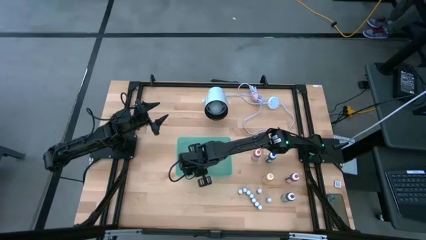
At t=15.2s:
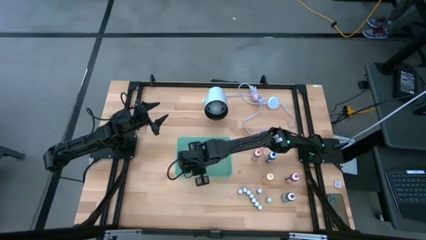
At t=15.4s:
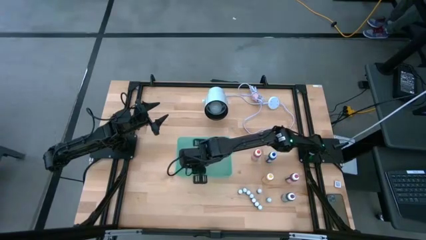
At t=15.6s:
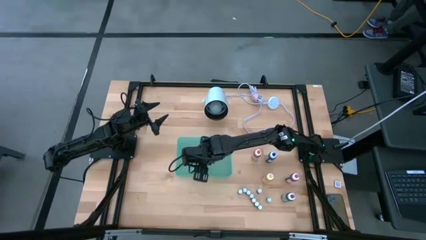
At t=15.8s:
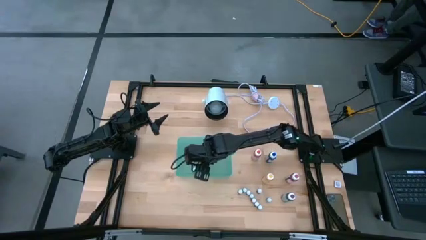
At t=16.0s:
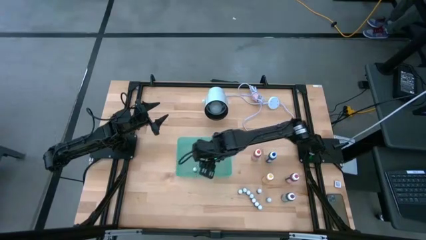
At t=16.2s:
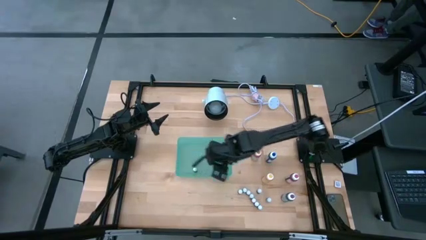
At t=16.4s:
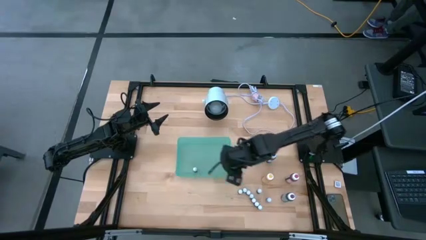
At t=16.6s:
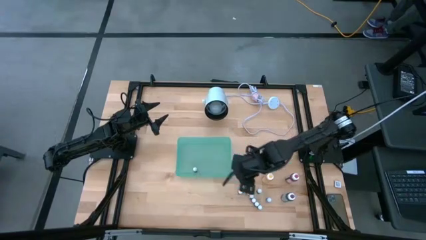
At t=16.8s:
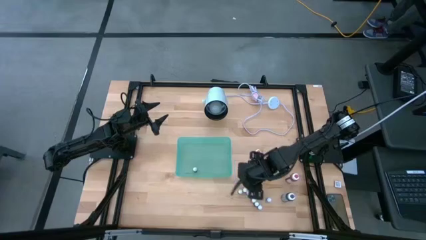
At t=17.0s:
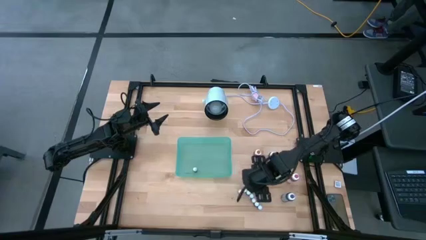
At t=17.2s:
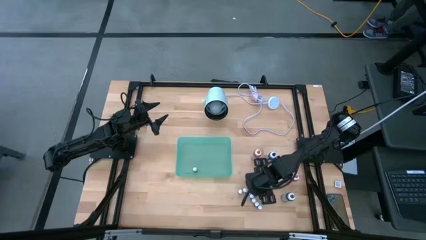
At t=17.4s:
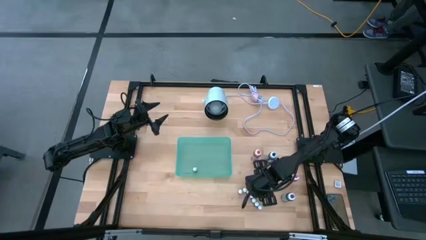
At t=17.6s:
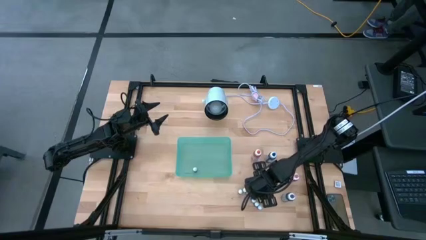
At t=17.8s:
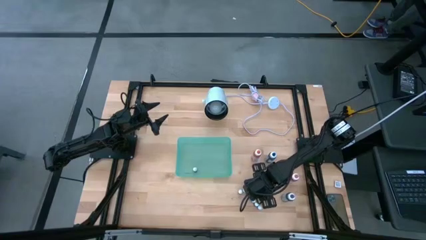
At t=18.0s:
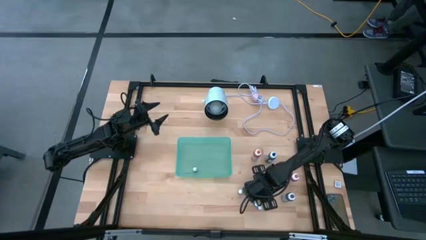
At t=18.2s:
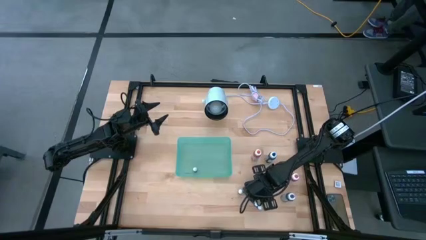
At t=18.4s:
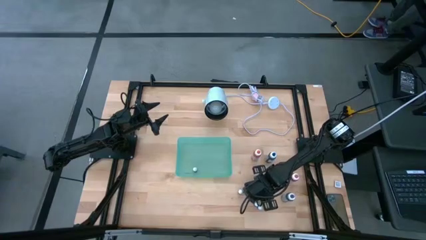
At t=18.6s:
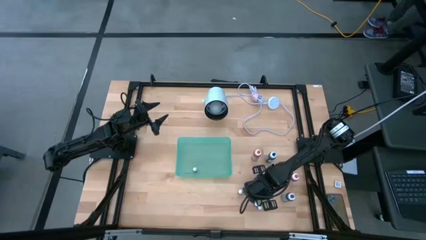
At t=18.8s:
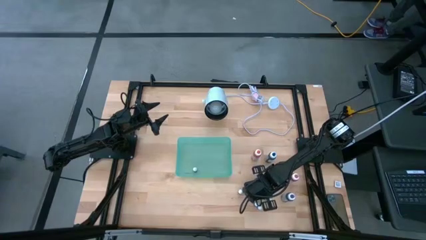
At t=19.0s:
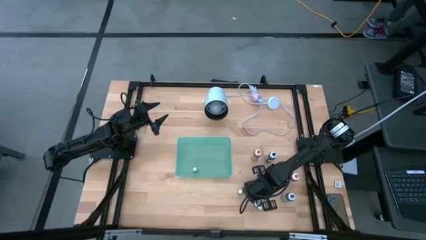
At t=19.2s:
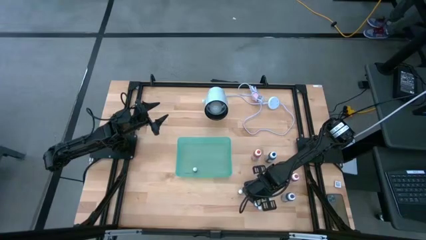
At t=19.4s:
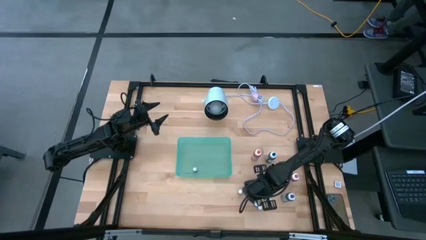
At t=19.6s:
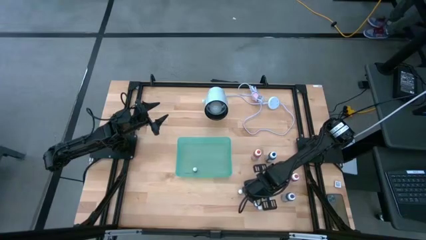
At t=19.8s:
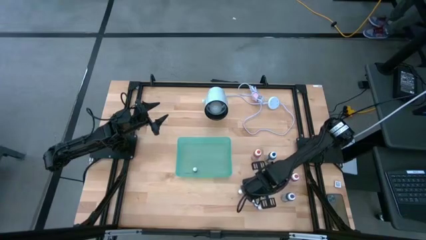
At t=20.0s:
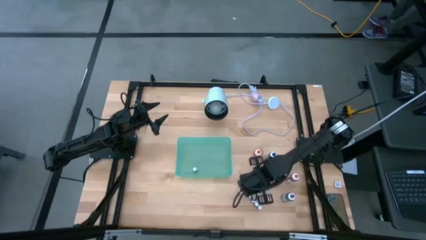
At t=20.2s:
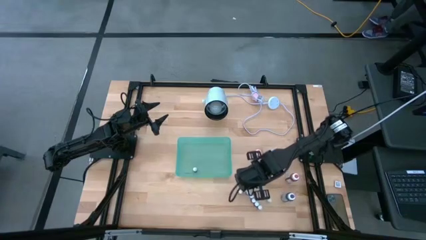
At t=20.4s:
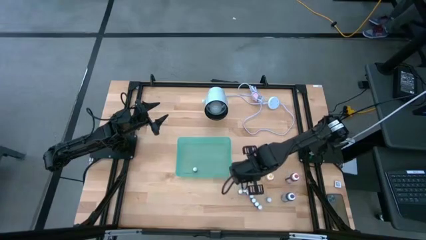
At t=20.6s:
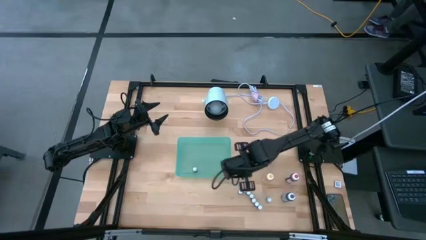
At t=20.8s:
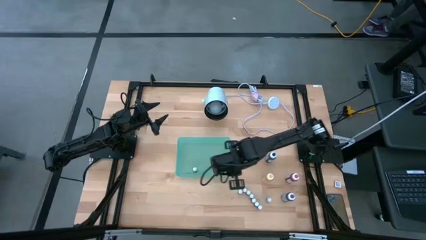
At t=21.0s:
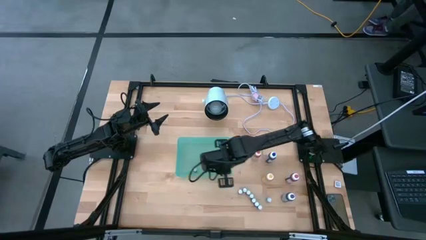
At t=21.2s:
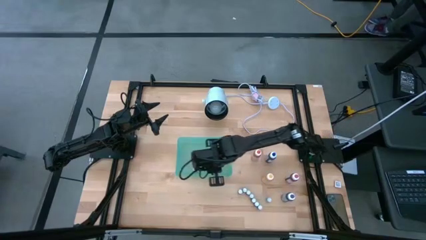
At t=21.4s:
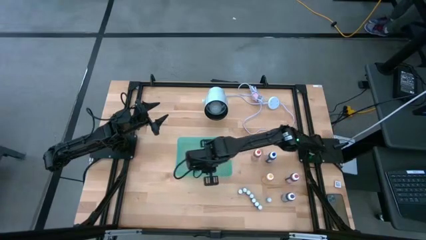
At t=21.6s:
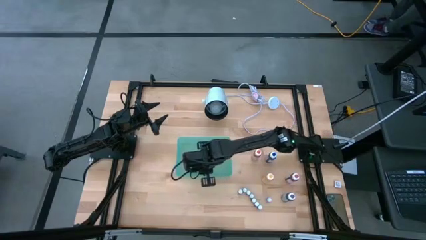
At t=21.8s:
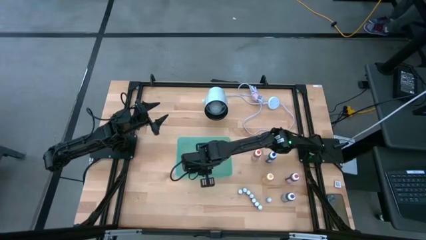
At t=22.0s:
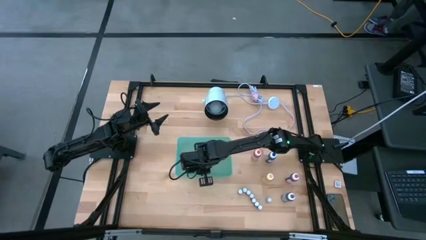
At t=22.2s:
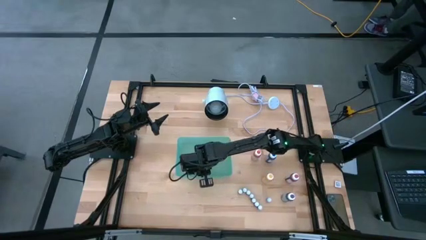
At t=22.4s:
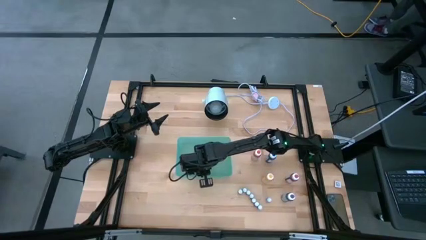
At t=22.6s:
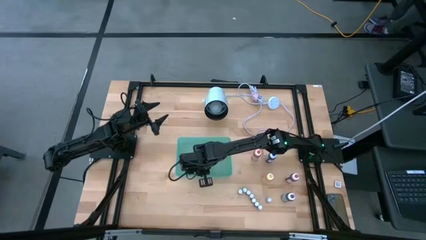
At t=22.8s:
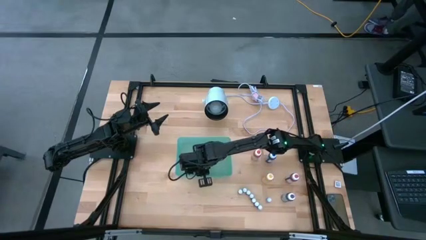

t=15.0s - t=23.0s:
Task: Pick & Place food coloring
Put the small dark blue food coloring bottle into the bin

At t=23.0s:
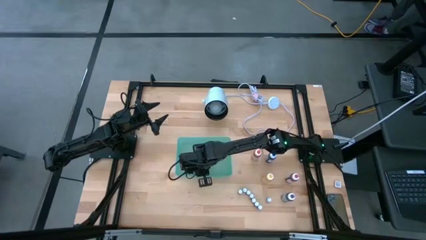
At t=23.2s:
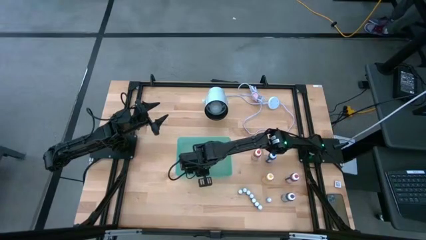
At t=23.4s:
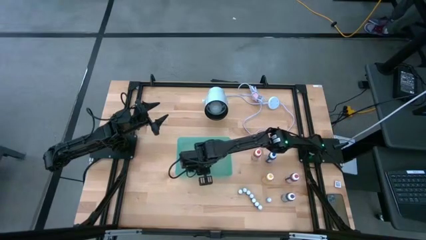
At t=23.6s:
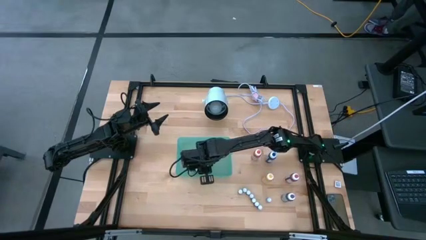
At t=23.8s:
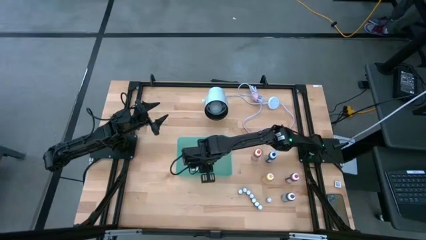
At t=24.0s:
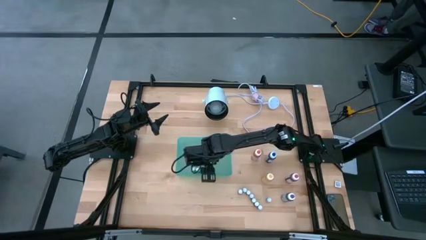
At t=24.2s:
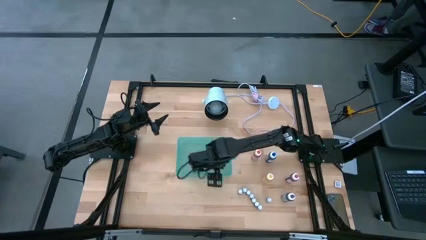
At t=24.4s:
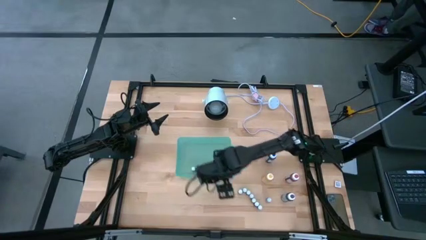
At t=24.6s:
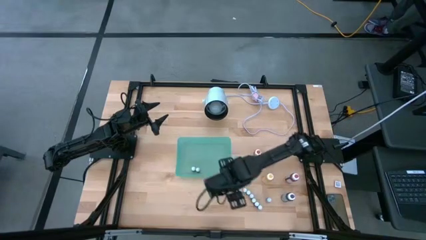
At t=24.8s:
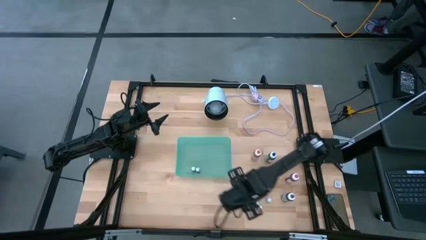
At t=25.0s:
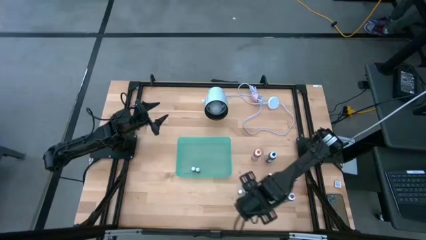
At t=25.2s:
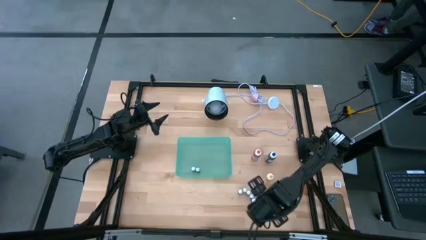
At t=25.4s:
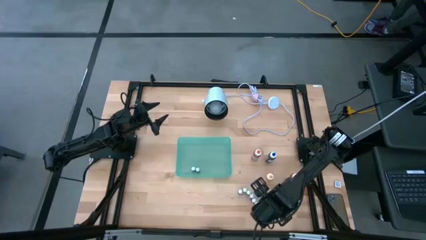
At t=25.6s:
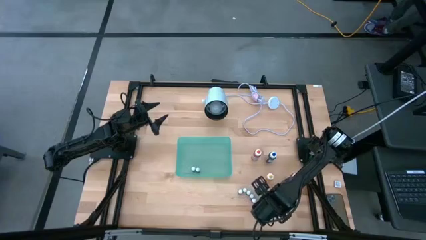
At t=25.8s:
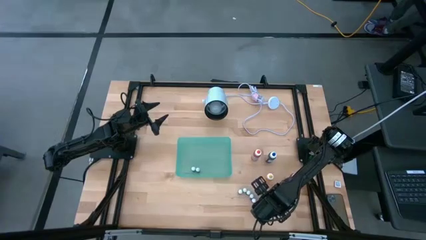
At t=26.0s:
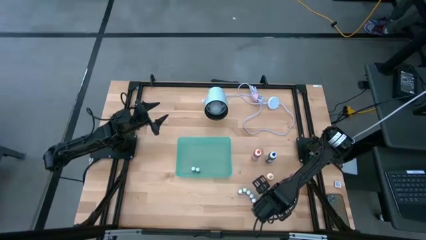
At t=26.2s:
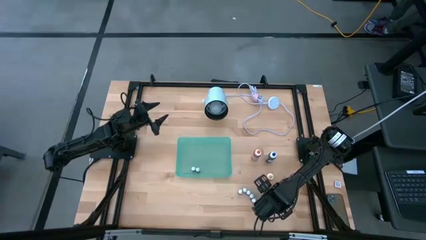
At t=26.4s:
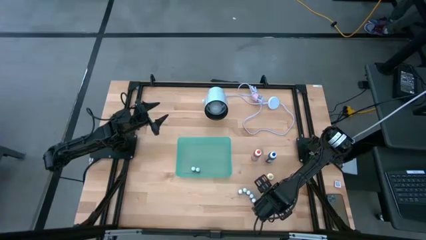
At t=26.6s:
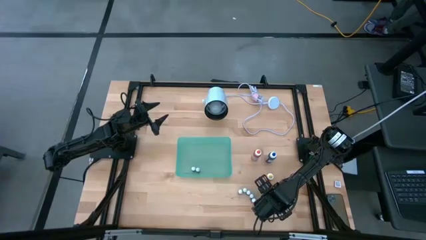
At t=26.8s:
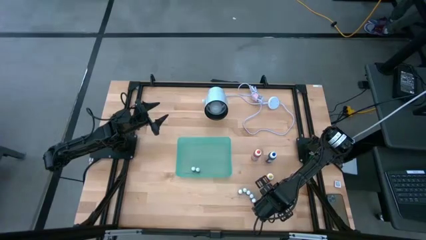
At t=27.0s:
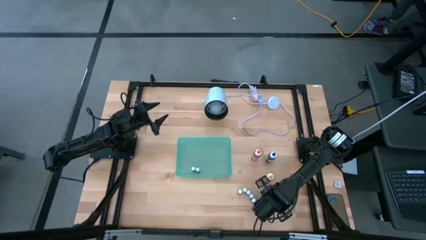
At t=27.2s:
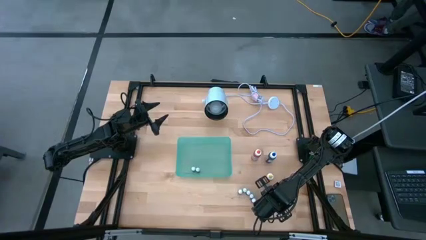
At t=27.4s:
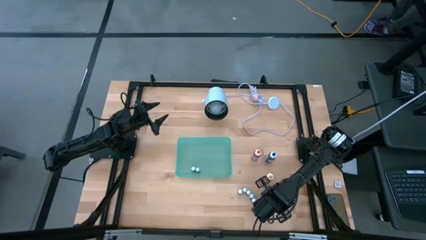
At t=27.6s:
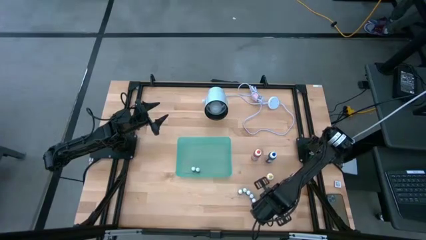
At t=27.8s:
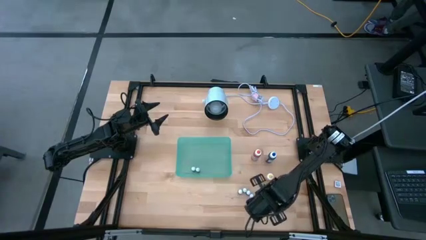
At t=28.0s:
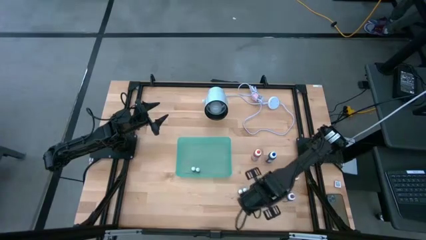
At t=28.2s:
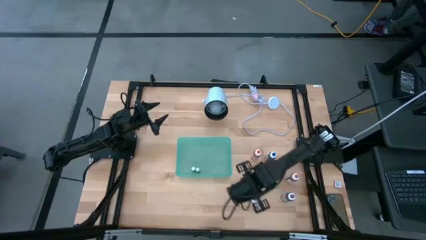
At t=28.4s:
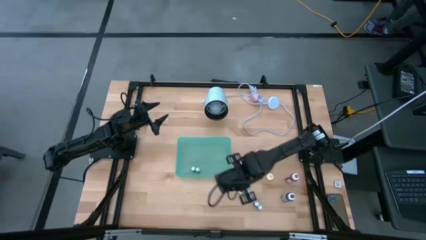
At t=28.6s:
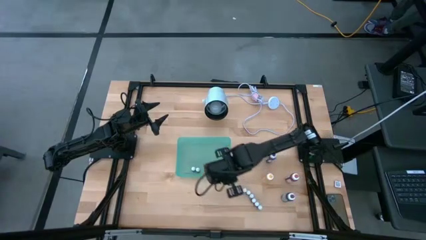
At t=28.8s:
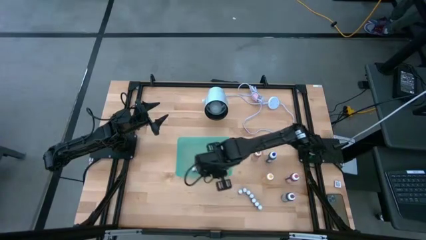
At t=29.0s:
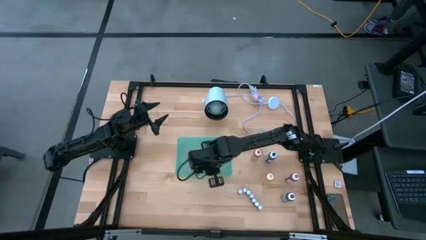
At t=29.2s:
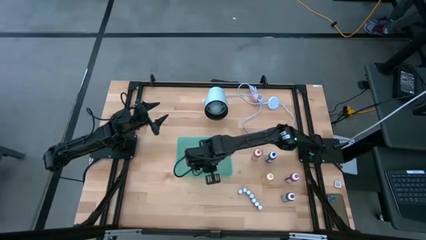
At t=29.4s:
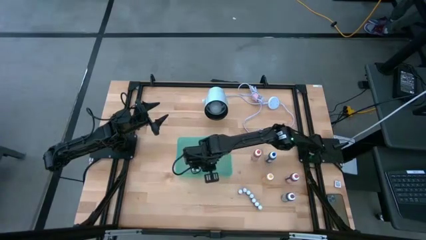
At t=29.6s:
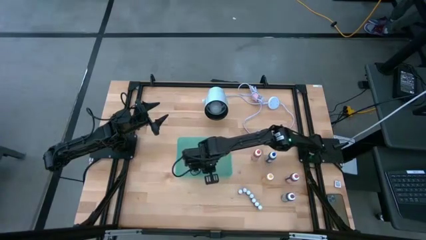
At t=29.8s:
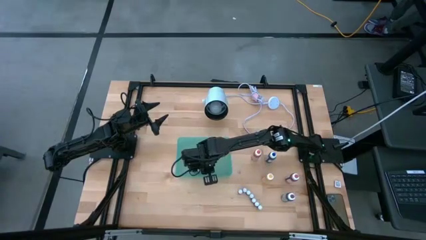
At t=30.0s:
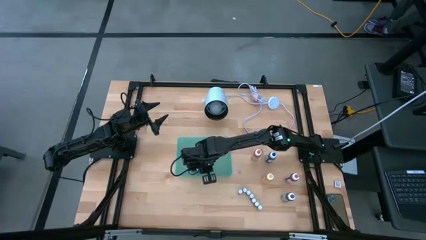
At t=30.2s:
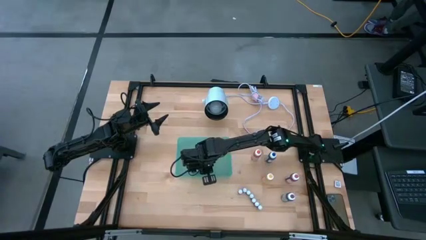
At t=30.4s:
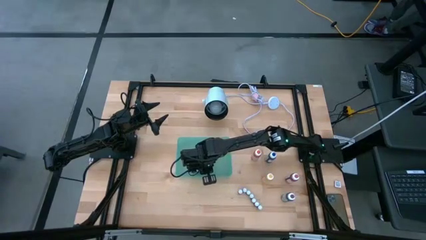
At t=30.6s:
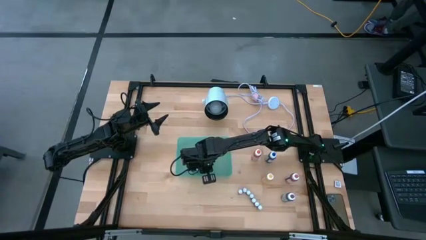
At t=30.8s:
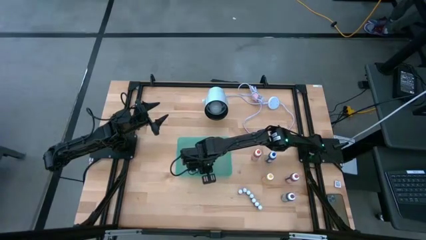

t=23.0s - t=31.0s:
Put the small blue food coloring bottle into the bin
